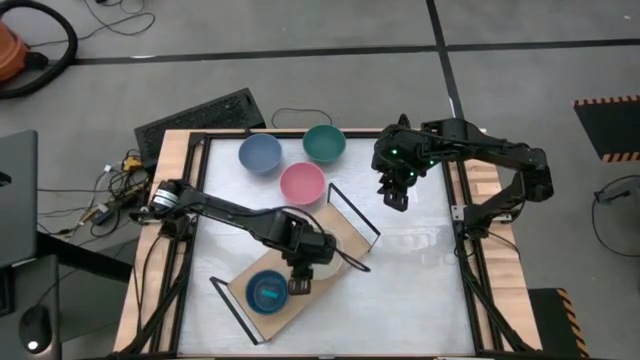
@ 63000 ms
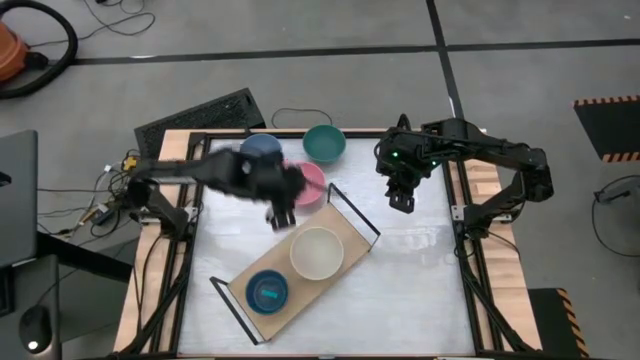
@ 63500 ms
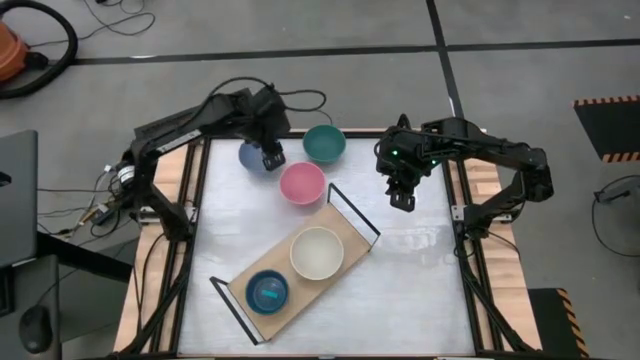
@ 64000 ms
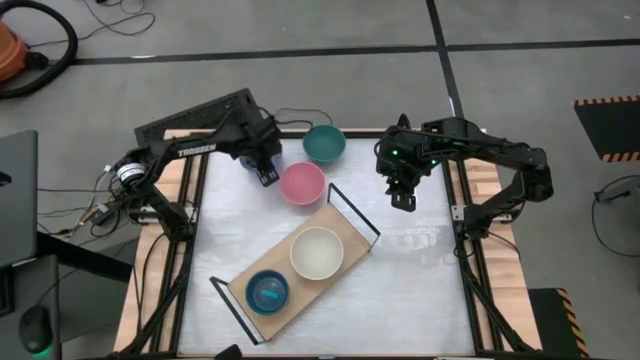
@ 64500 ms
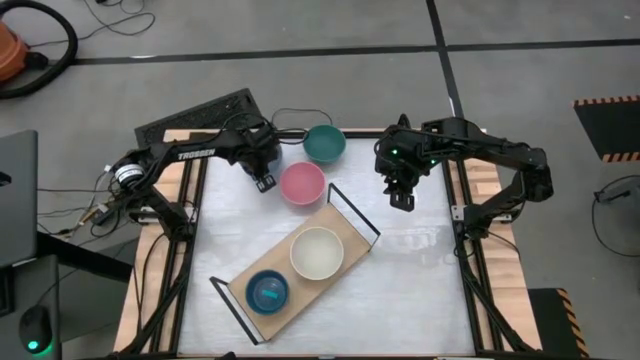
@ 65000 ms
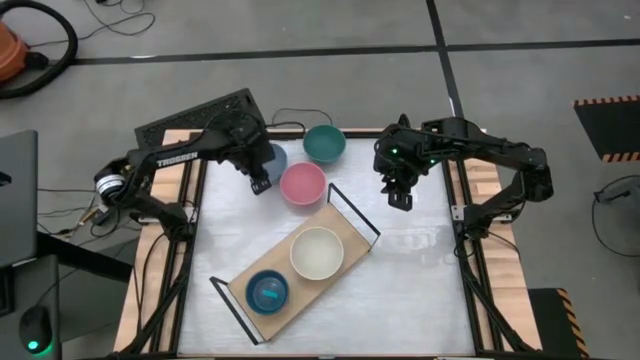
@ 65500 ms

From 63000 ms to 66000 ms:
Task: Place and stack bowls onto a shelf
Stack the light blue bowl on the top white bowl on the shelf

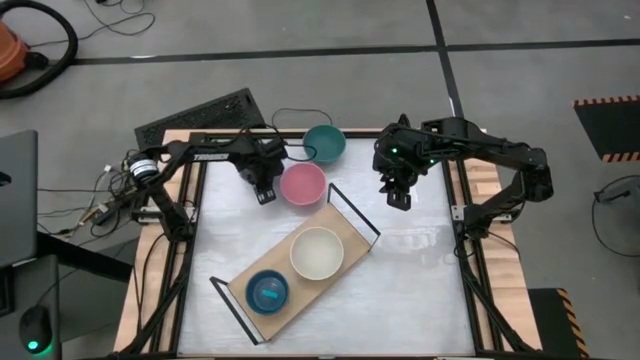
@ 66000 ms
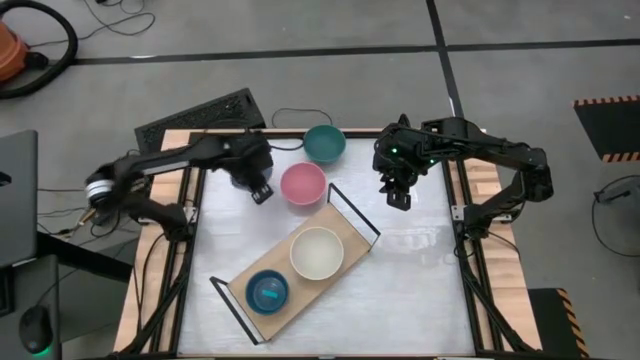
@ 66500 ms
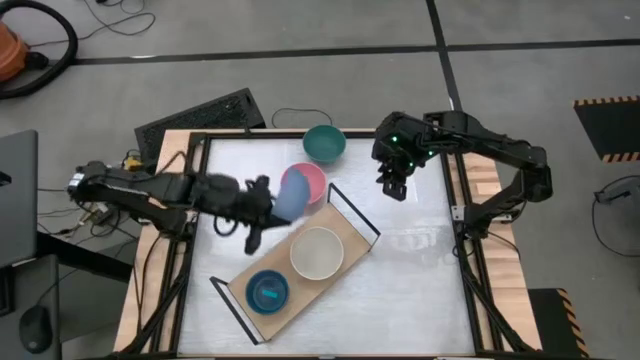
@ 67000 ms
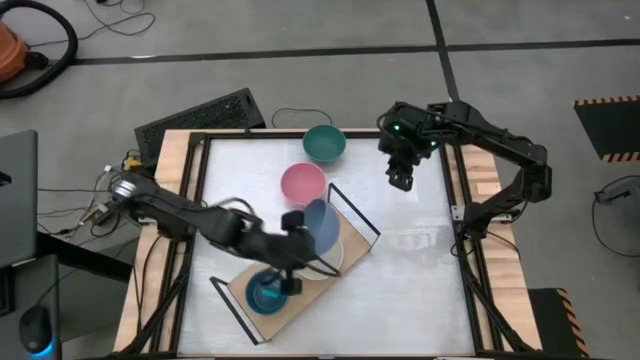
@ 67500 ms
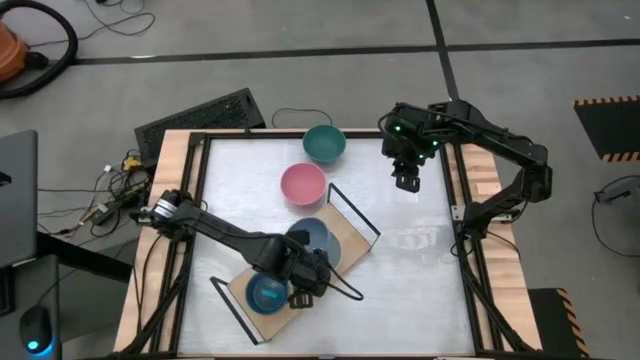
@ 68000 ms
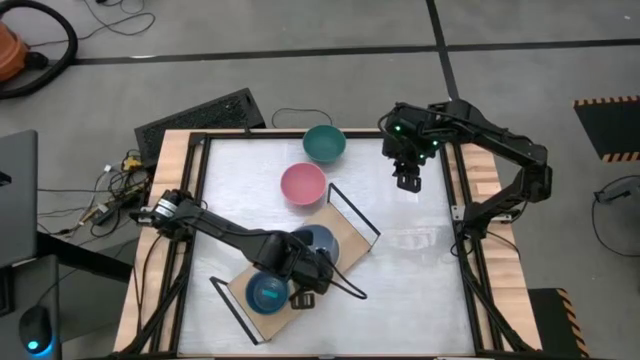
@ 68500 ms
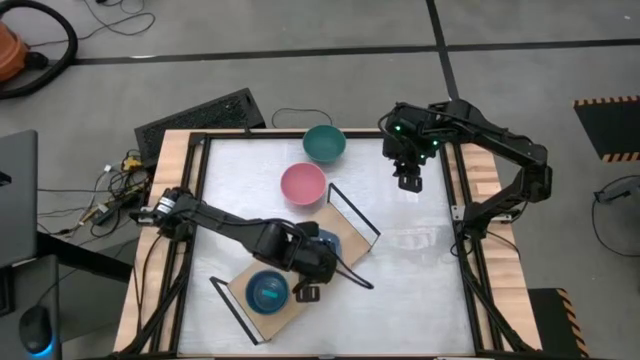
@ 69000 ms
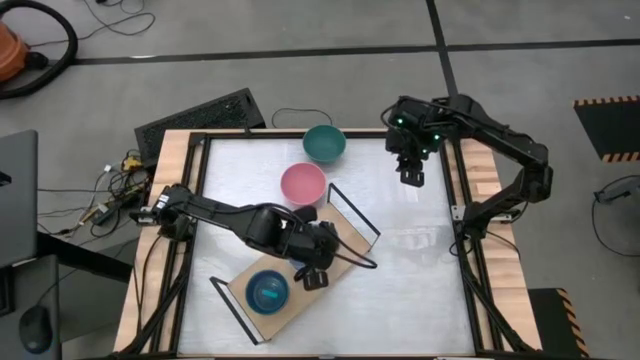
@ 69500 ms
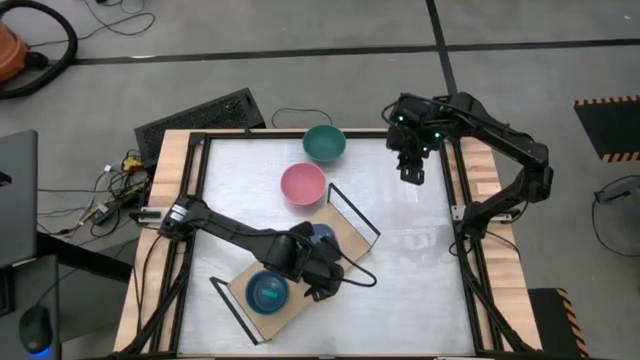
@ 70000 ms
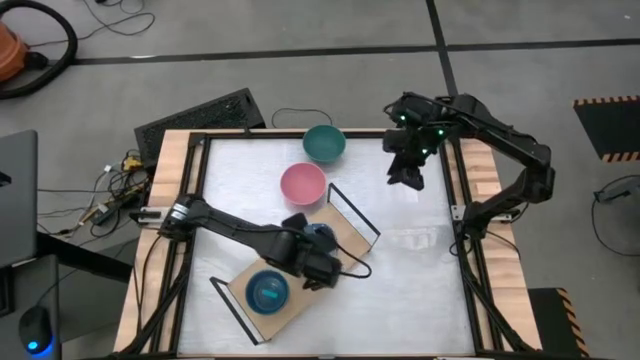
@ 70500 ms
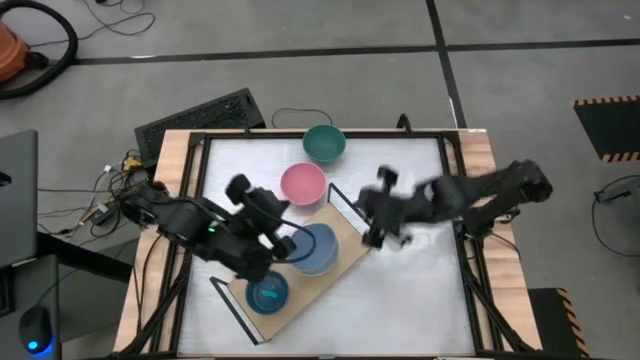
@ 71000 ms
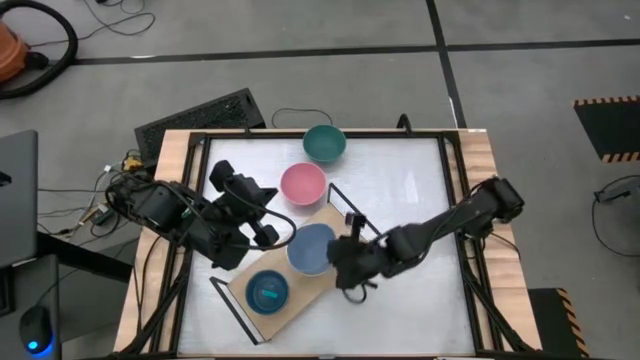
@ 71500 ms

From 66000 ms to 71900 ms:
Stack the light blue bowl on the top white bowl on the shelf

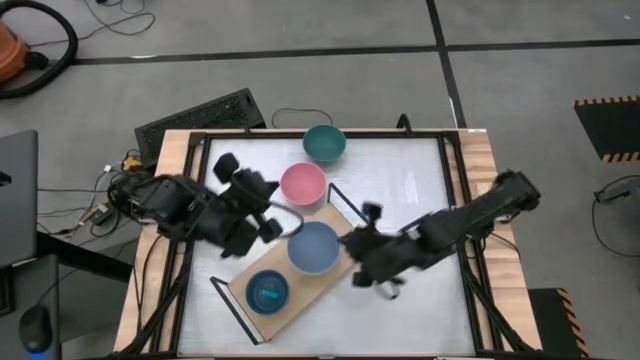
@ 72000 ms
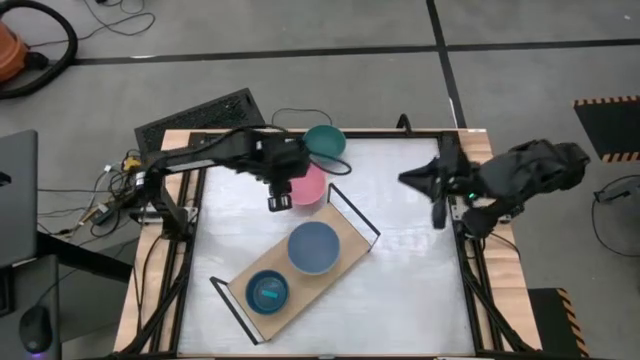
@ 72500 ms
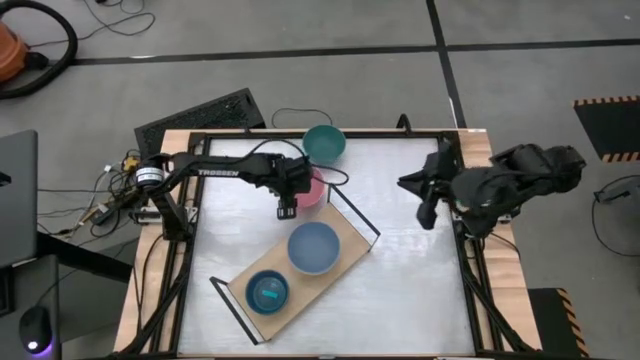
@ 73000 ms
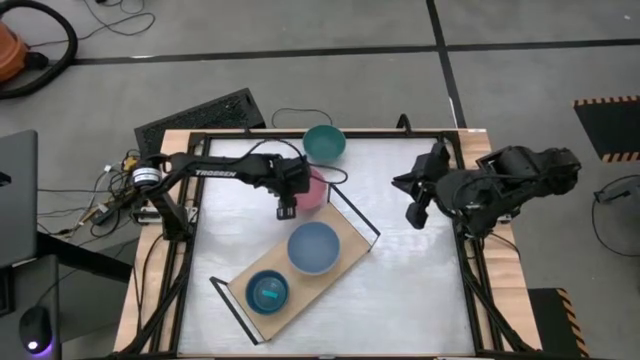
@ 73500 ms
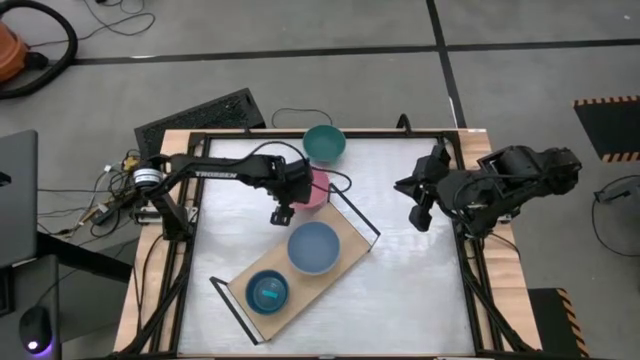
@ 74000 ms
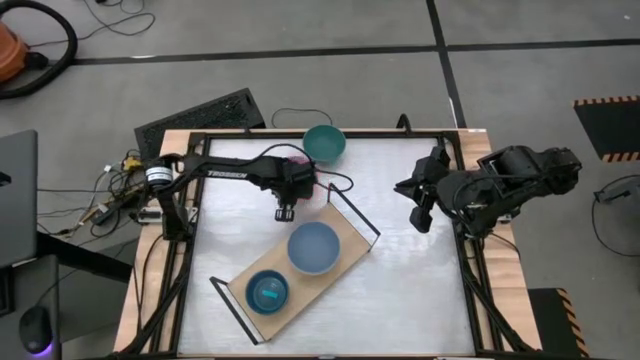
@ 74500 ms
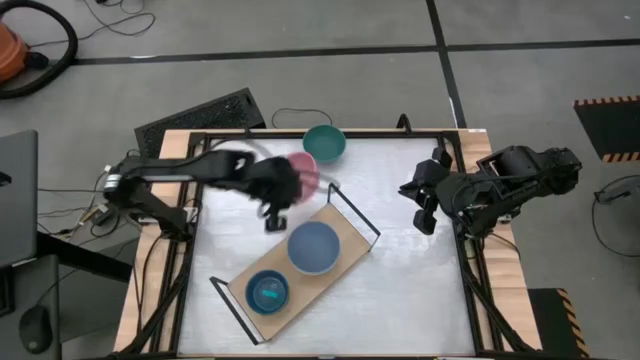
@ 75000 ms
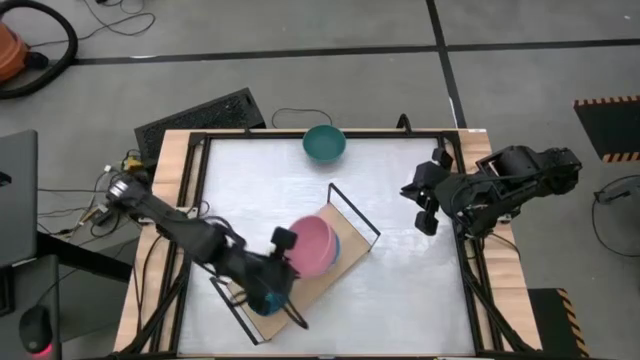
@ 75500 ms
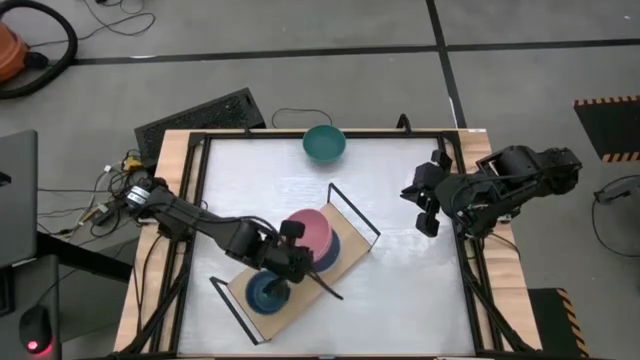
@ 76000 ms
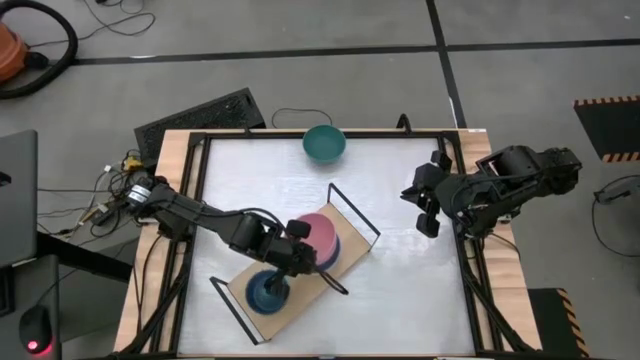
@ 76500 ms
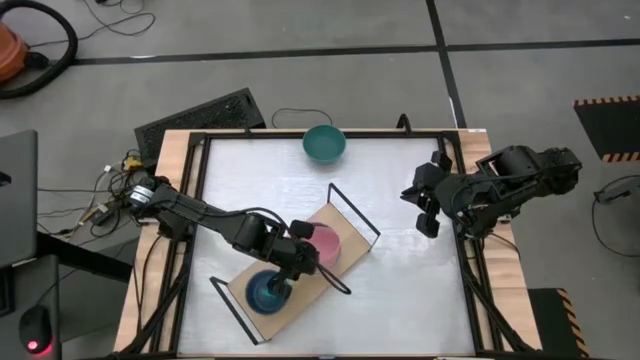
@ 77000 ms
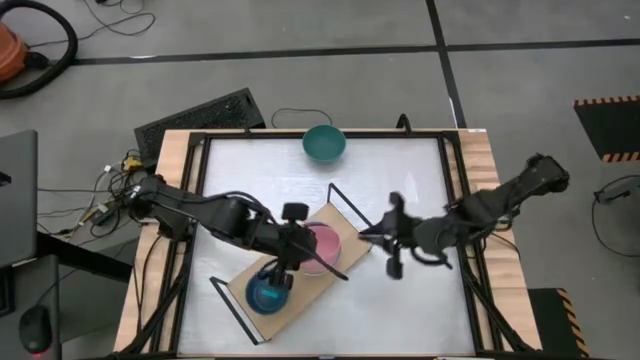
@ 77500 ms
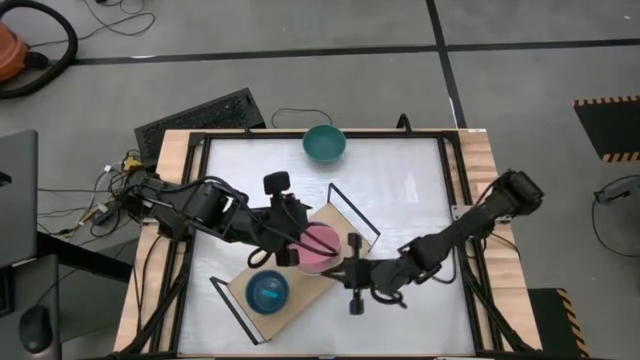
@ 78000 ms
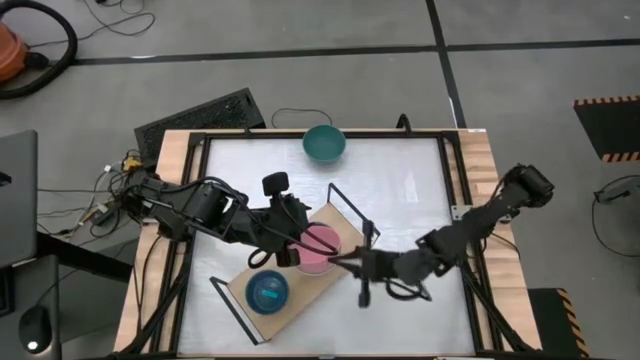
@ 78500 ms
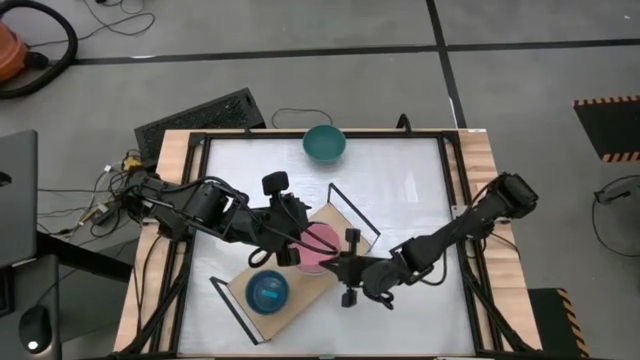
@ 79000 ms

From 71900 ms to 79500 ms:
Stack the light pink bowl on the top light blue bowl on the shelf

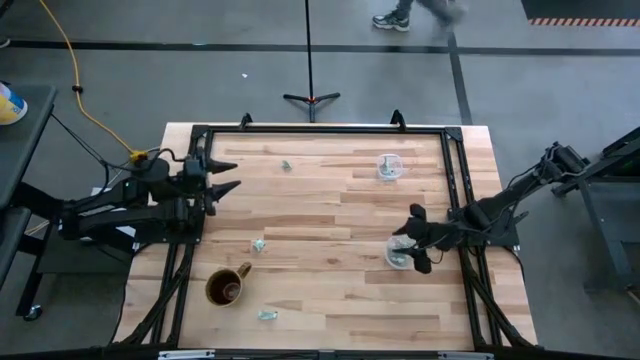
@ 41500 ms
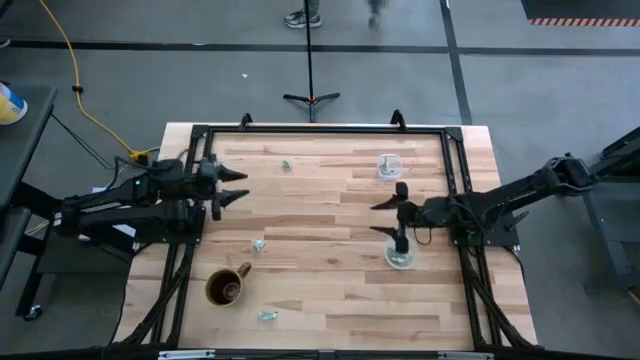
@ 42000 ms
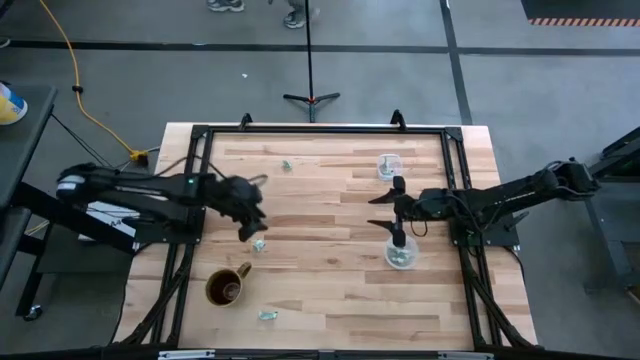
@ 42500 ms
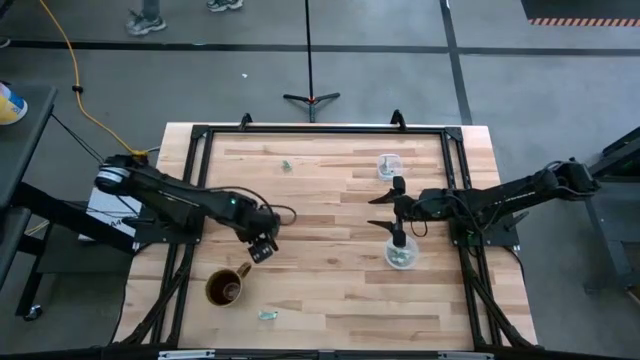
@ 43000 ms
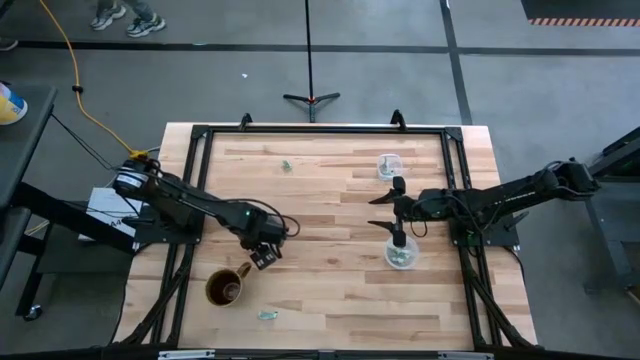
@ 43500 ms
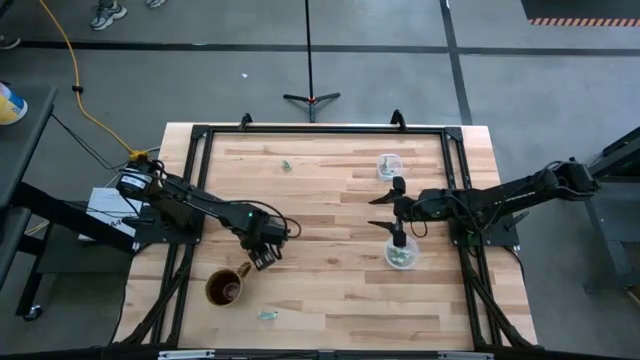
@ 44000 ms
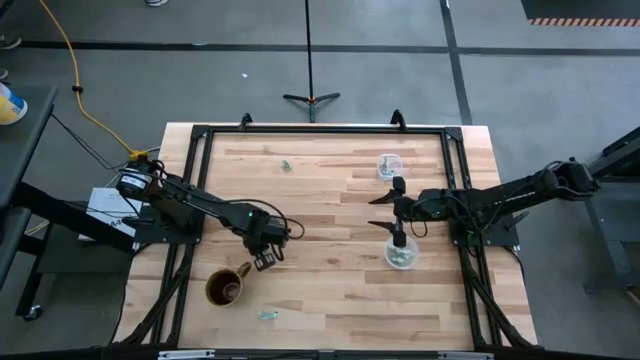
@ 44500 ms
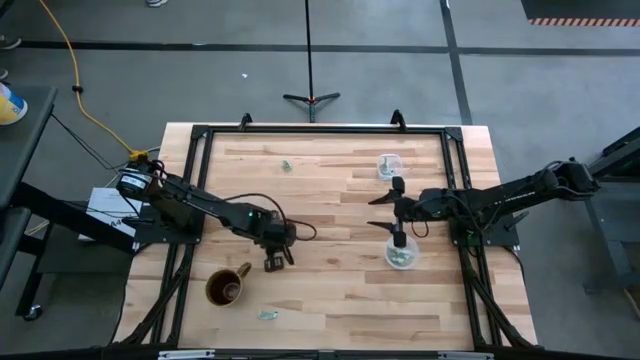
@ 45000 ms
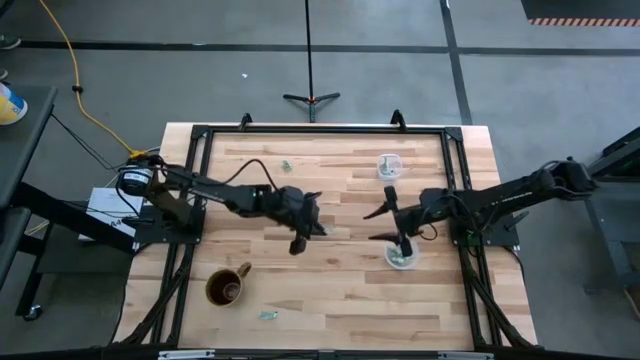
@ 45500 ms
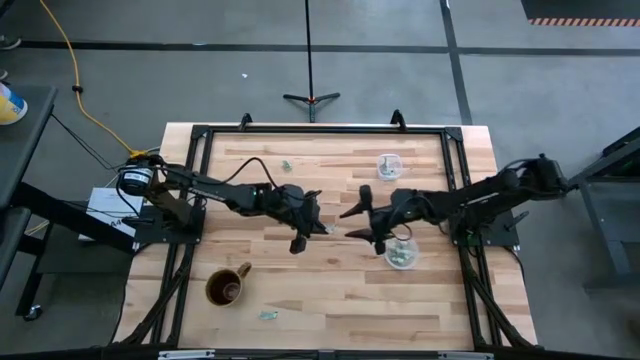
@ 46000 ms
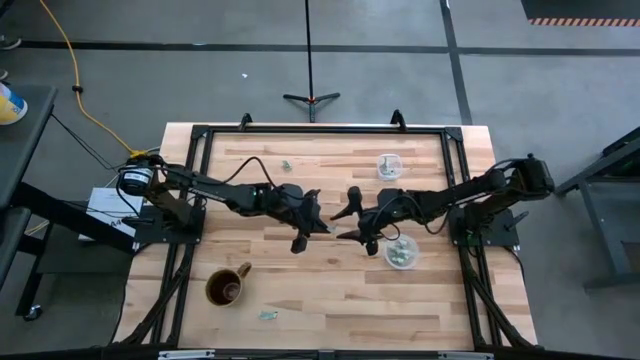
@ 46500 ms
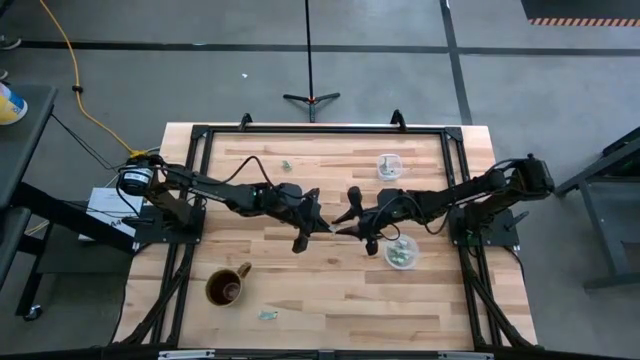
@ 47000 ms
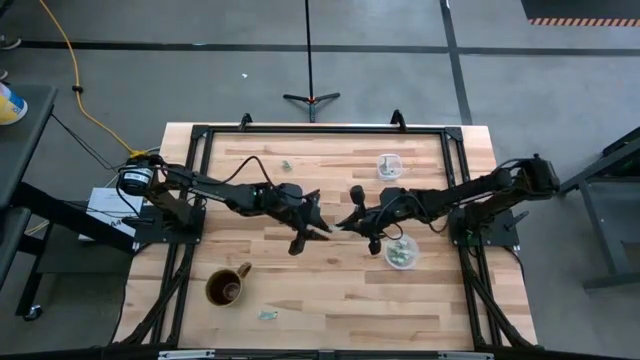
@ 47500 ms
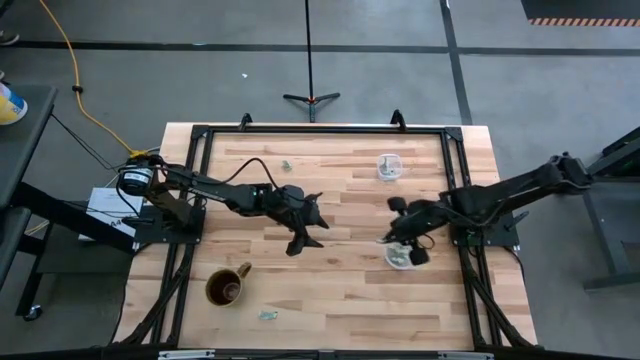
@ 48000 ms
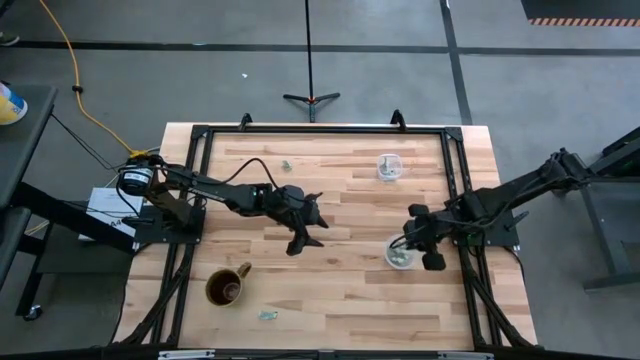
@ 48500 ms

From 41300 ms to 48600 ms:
Task: Pick and place items into bin
Put the green stevia packet into the bottom transparent bin
